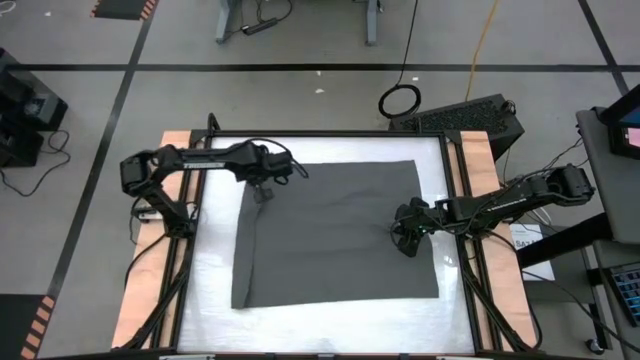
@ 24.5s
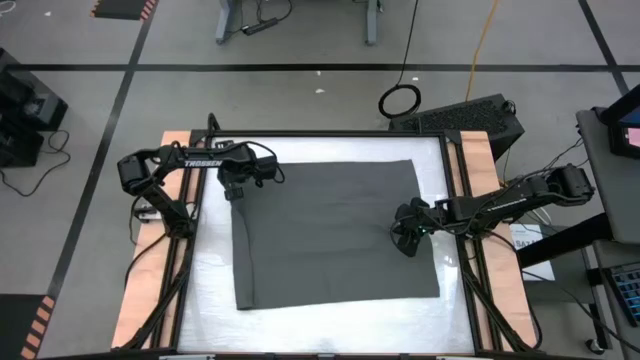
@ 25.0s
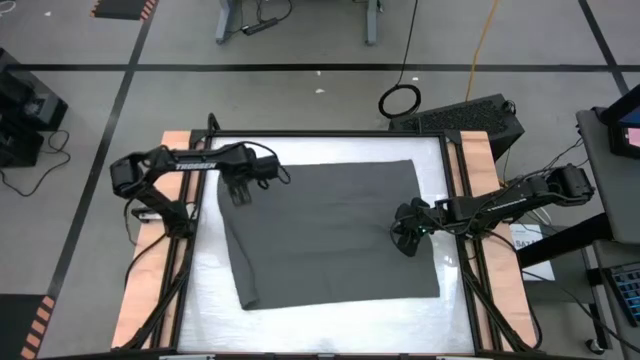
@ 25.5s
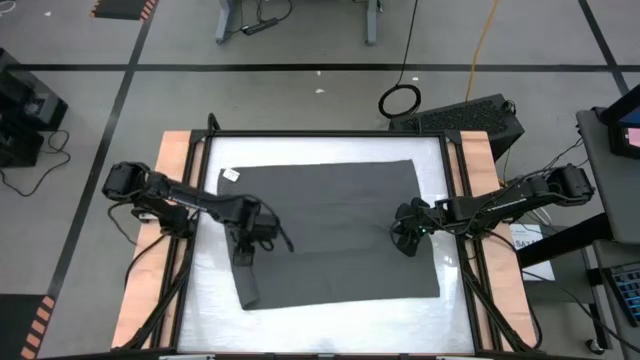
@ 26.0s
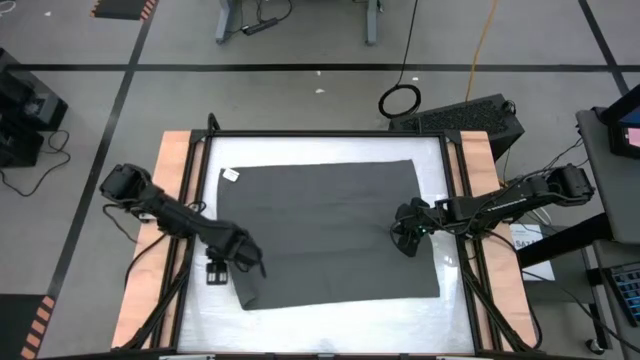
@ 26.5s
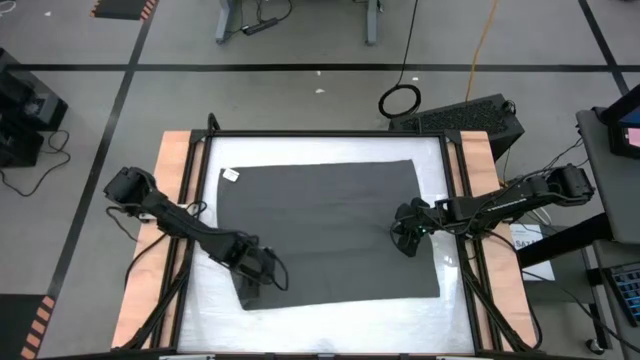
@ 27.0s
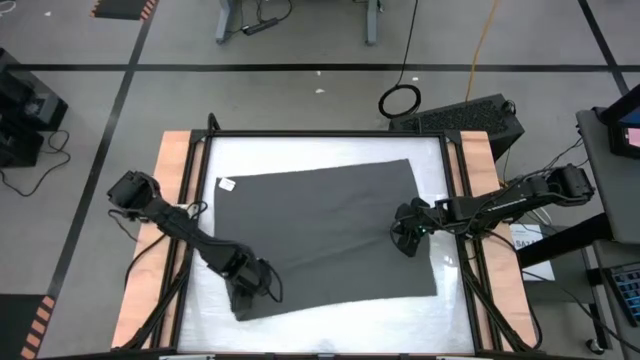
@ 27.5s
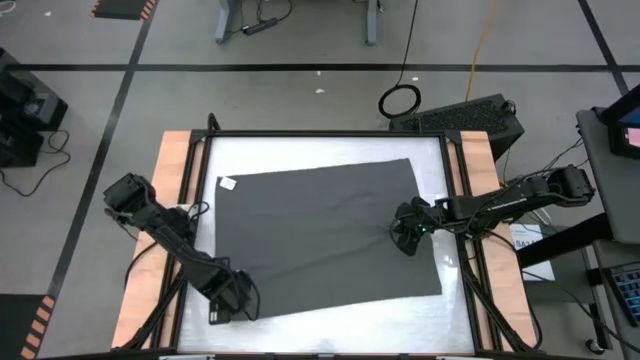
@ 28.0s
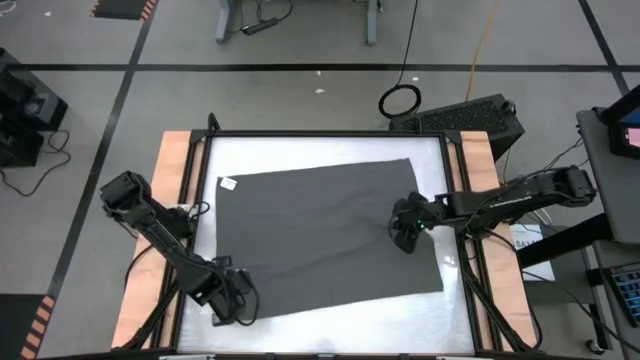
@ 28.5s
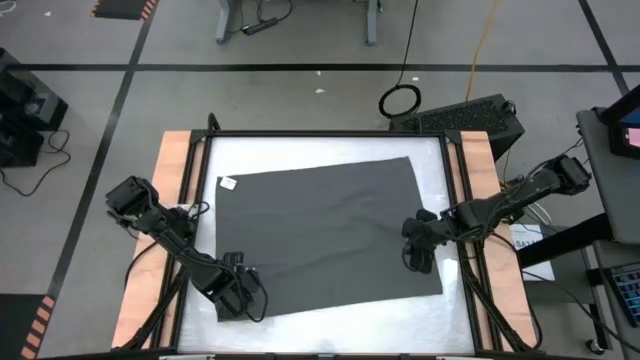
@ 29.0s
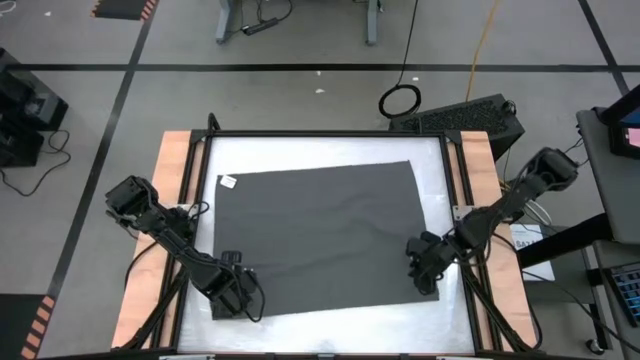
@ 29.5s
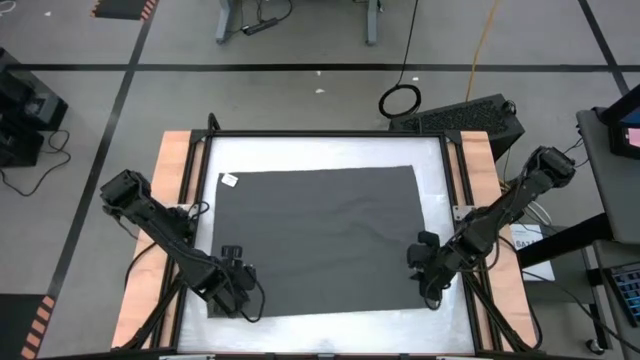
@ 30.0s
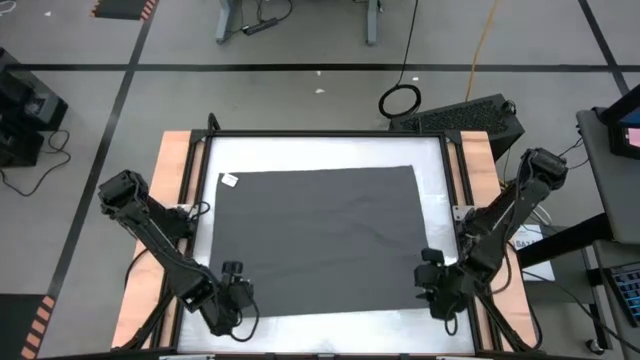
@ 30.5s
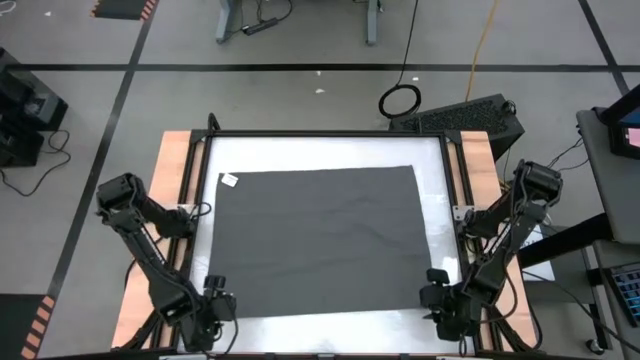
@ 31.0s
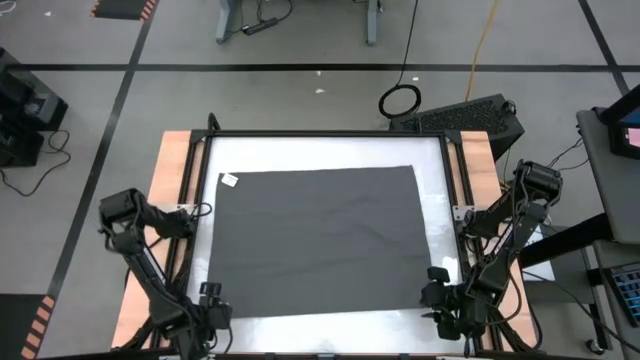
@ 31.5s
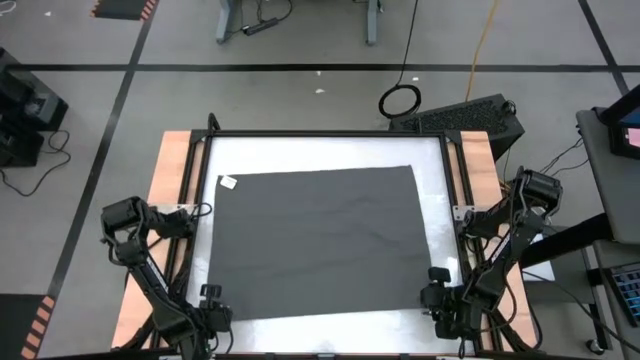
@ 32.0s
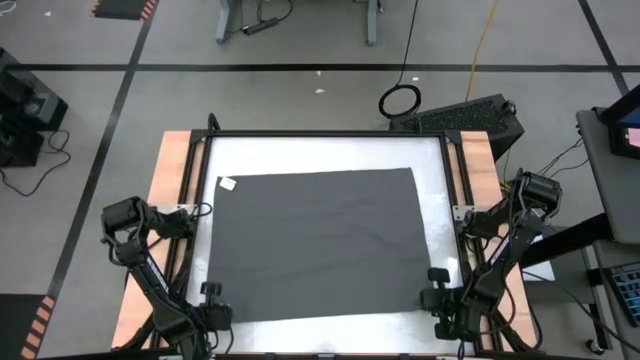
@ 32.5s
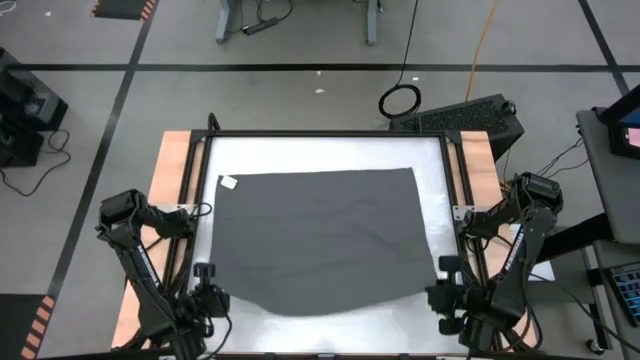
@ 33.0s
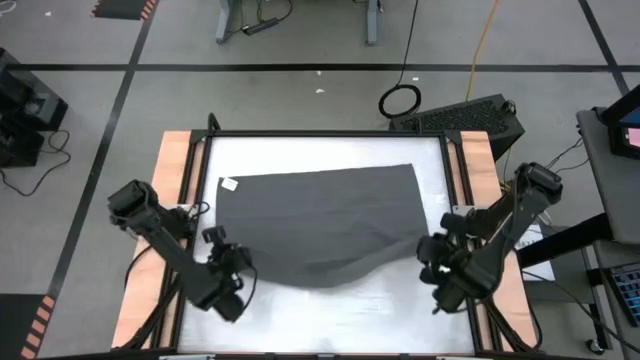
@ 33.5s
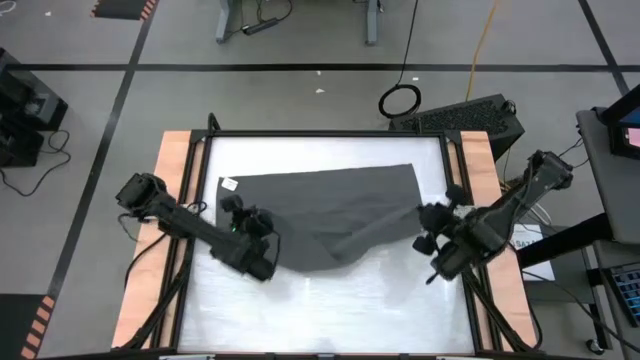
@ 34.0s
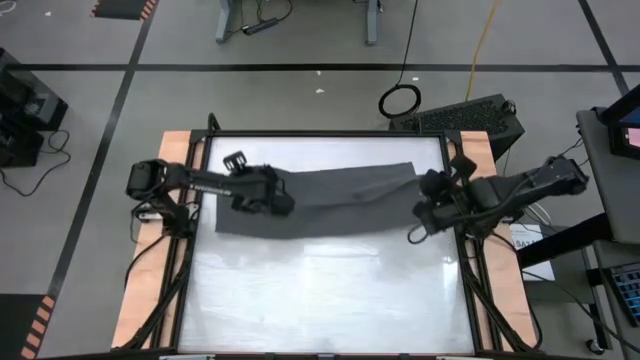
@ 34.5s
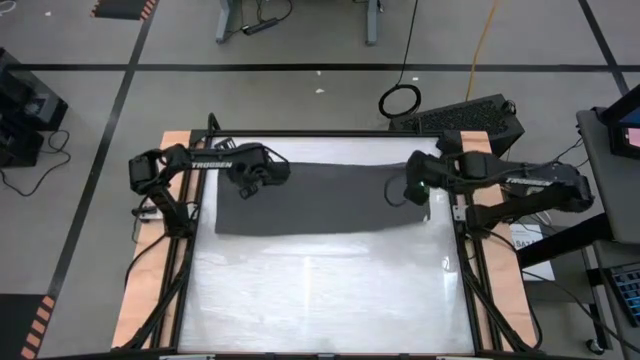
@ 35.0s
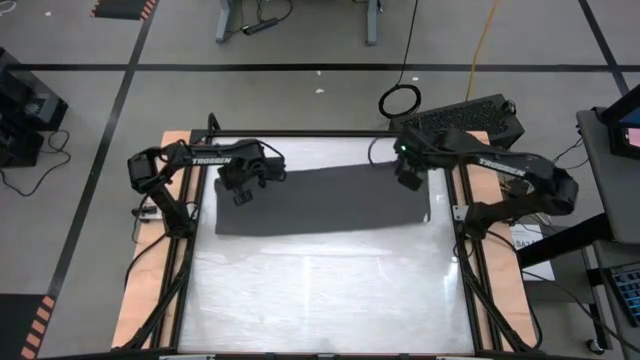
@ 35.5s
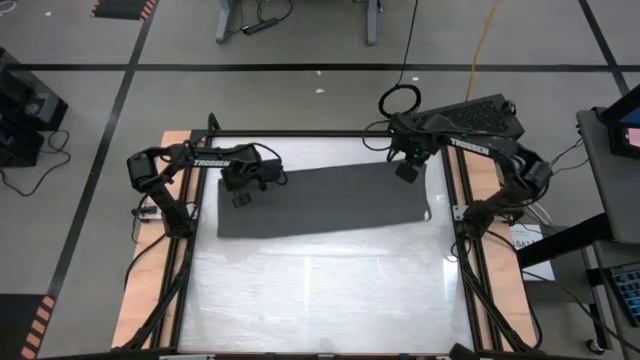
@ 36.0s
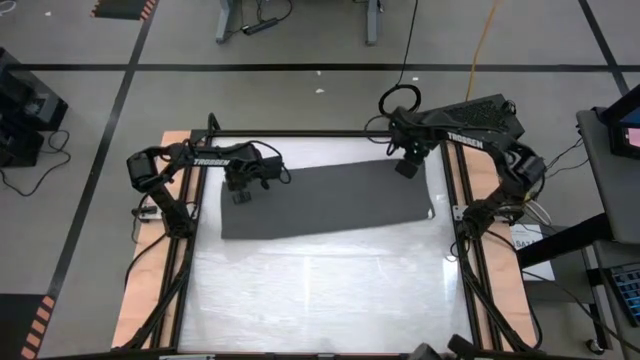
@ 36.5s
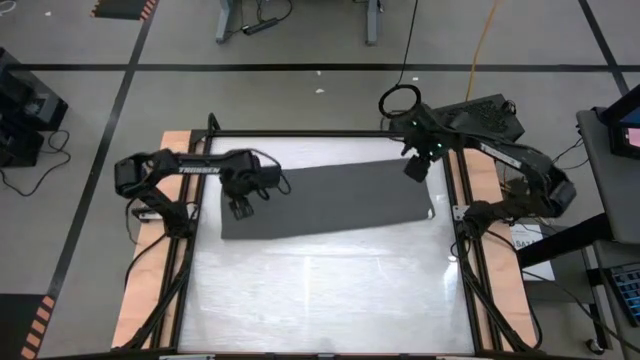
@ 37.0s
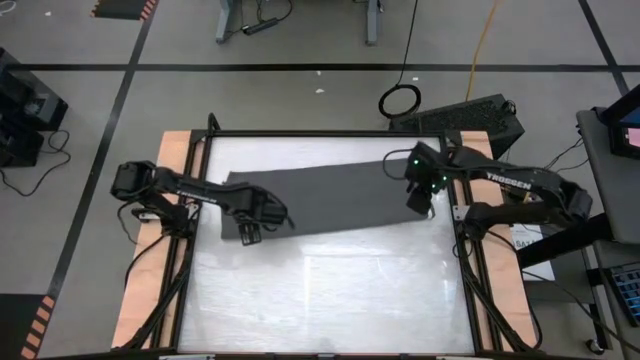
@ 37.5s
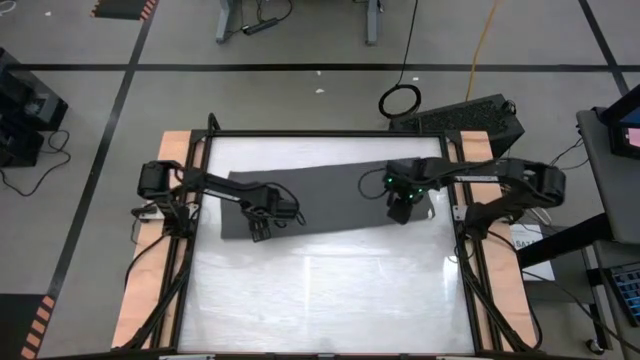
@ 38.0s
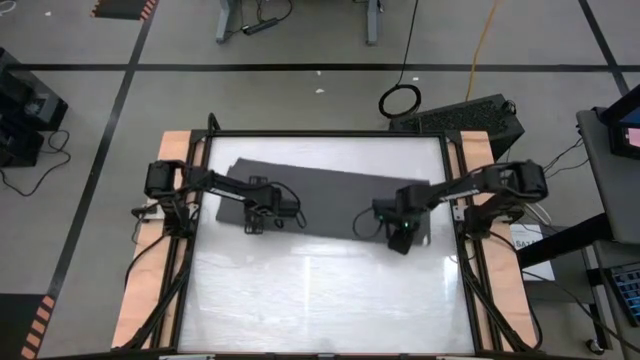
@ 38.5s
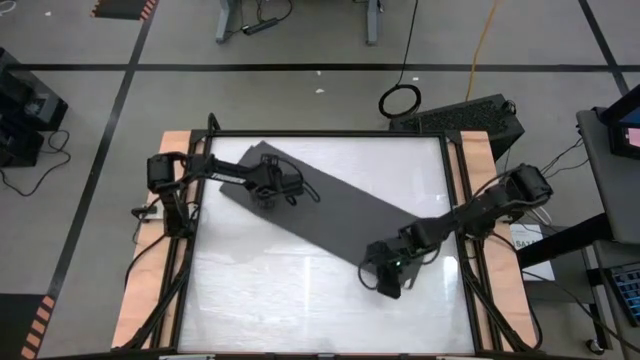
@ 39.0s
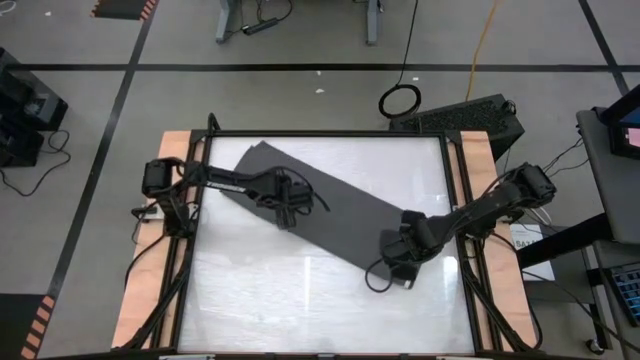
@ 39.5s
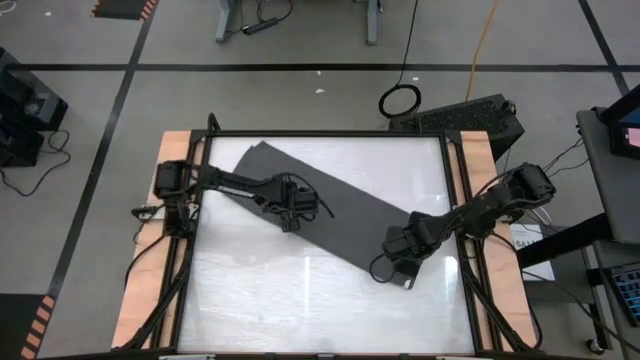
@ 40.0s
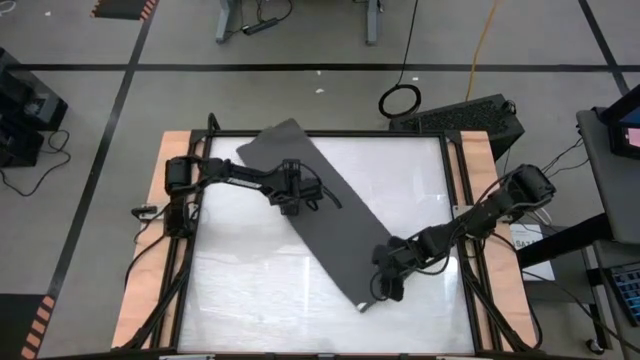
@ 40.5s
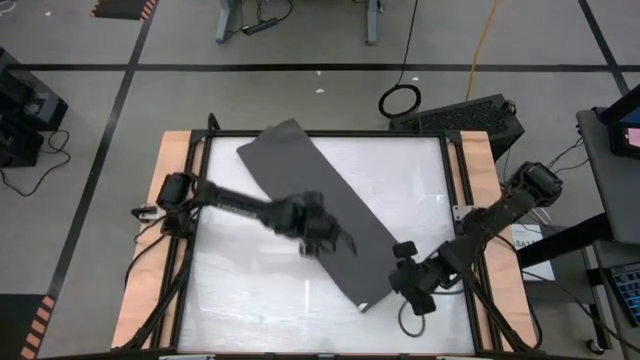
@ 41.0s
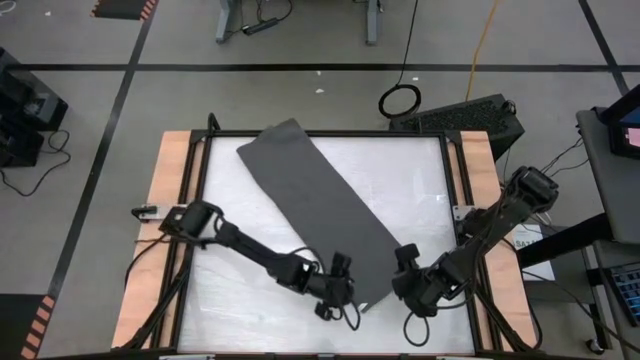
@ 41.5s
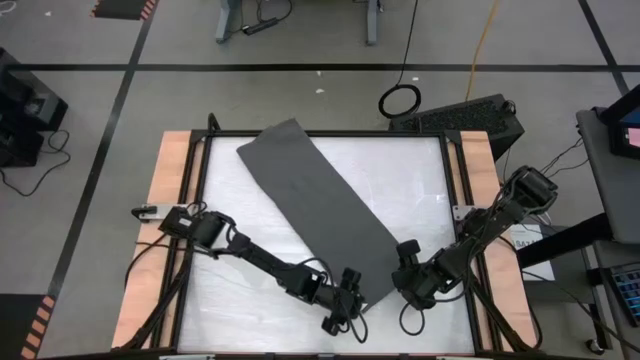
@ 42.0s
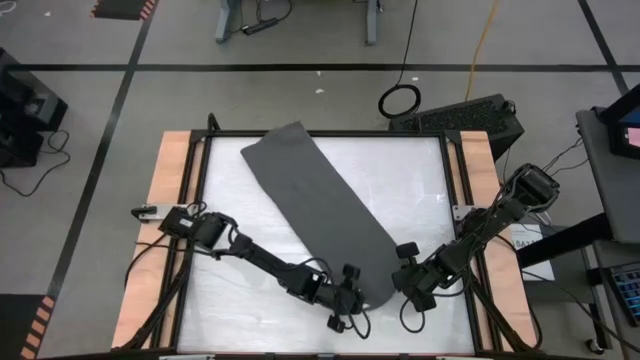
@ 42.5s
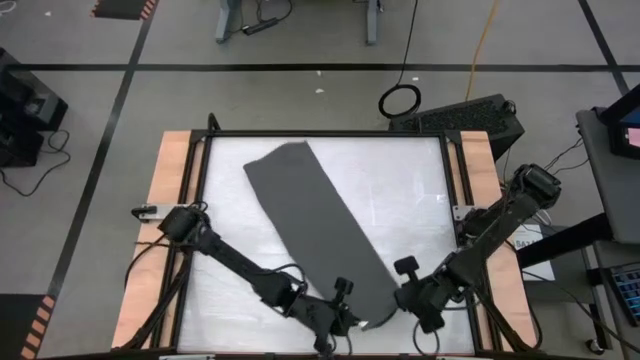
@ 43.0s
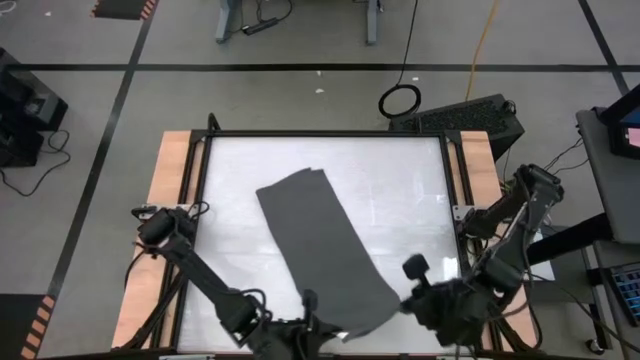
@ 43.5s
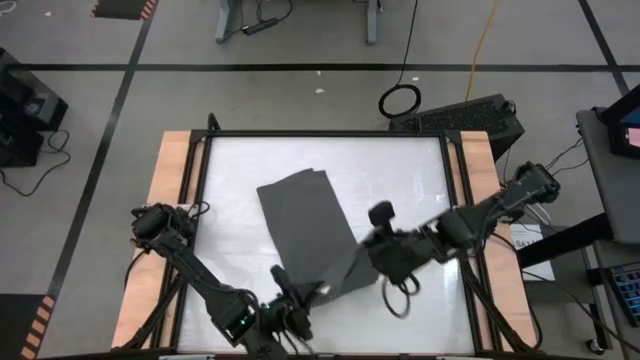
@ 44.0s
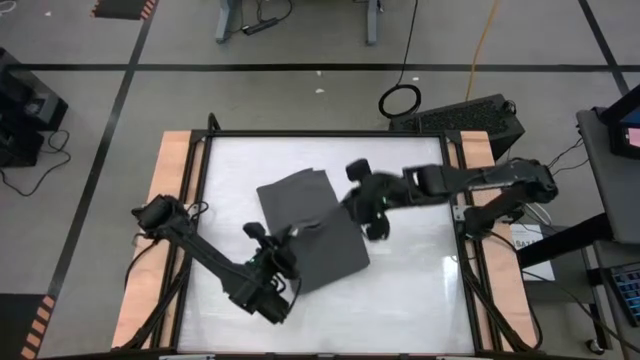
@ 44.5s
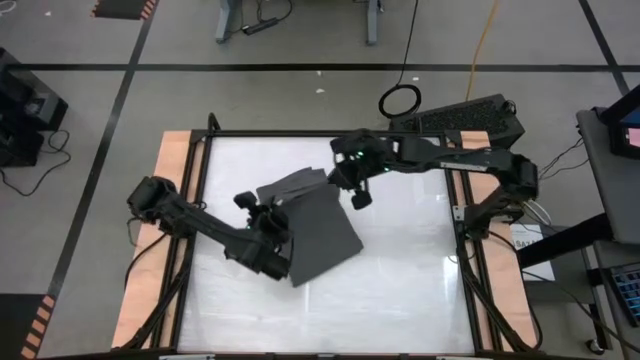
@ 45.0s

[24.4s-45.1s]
Task: Roll towel
Fold the dark gray towel
